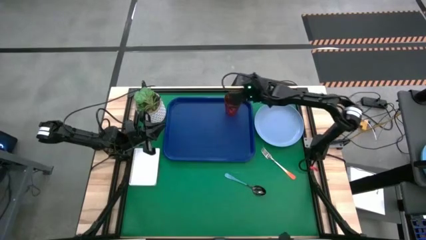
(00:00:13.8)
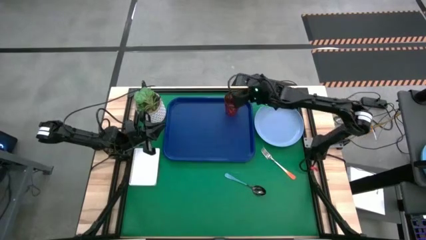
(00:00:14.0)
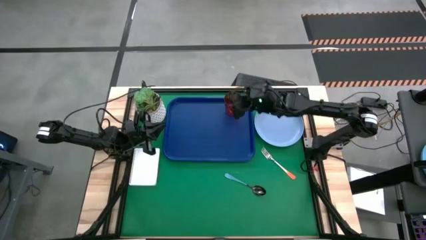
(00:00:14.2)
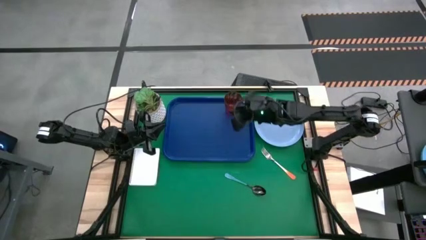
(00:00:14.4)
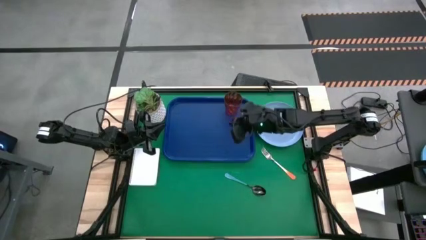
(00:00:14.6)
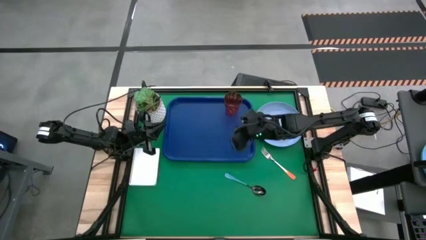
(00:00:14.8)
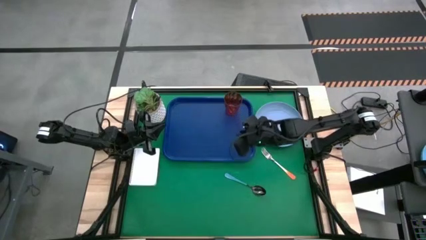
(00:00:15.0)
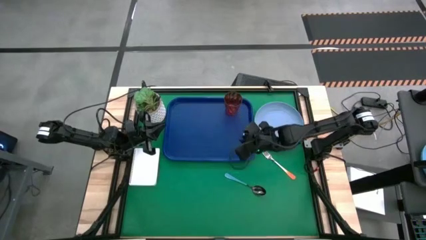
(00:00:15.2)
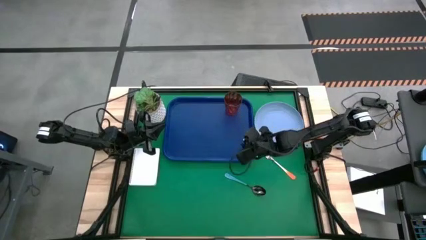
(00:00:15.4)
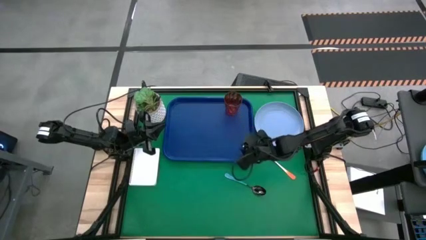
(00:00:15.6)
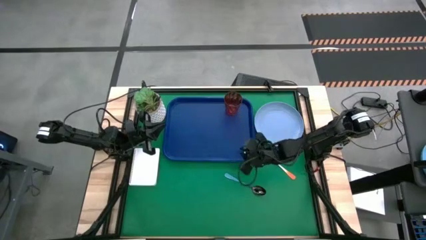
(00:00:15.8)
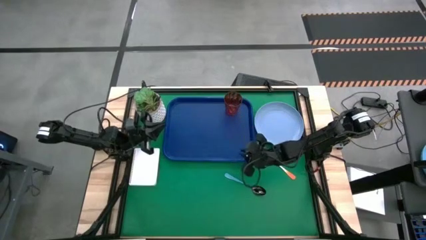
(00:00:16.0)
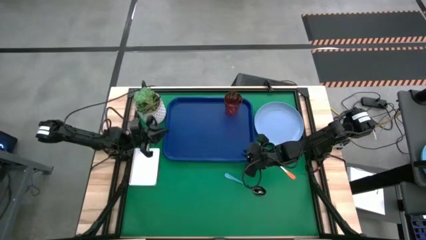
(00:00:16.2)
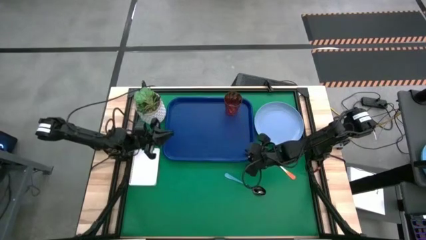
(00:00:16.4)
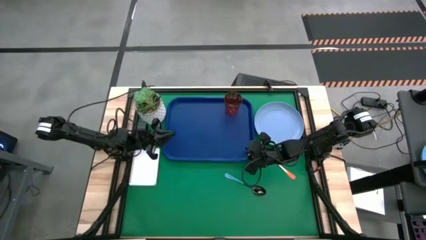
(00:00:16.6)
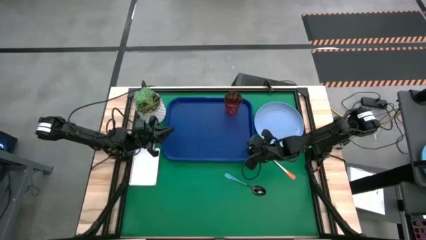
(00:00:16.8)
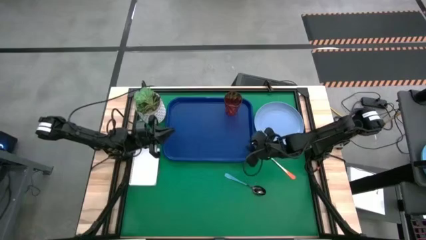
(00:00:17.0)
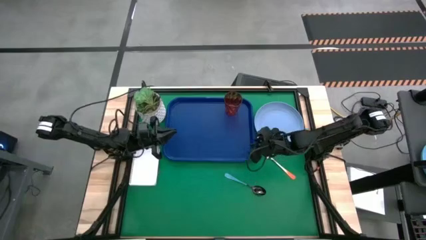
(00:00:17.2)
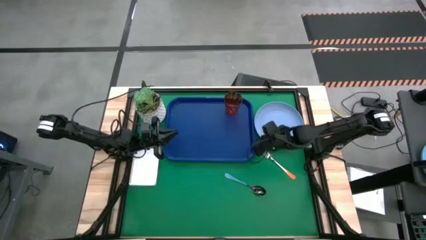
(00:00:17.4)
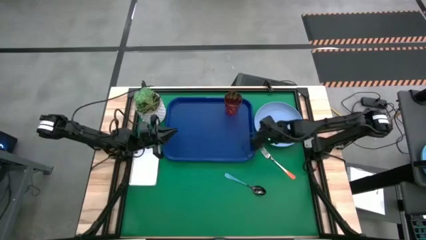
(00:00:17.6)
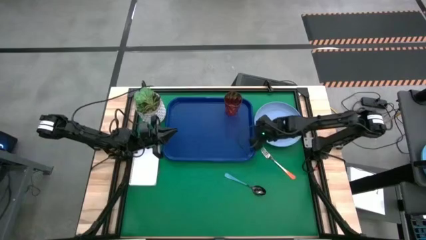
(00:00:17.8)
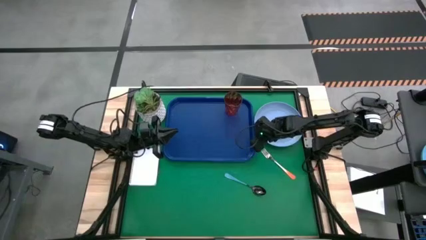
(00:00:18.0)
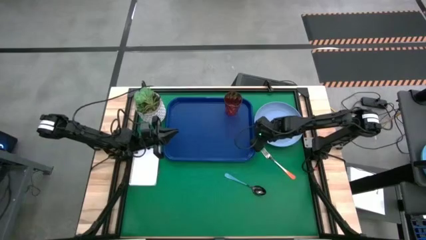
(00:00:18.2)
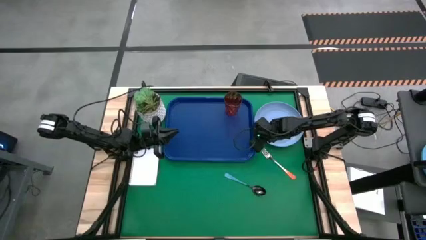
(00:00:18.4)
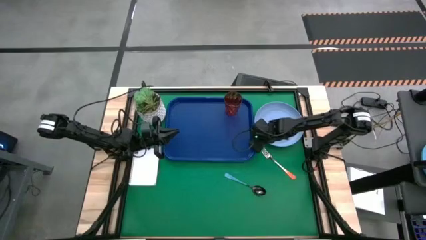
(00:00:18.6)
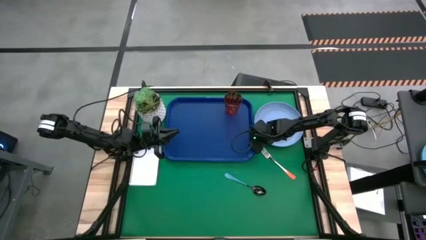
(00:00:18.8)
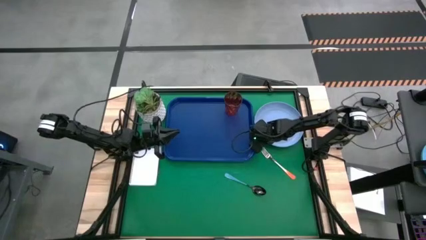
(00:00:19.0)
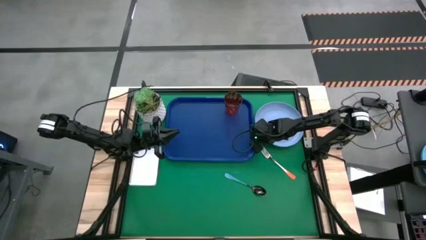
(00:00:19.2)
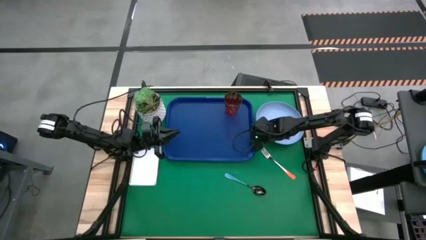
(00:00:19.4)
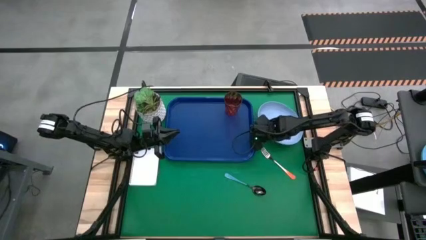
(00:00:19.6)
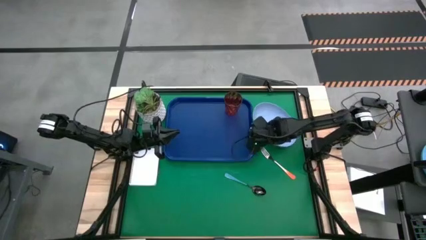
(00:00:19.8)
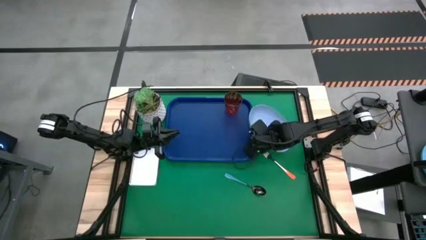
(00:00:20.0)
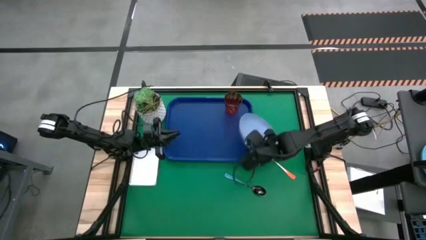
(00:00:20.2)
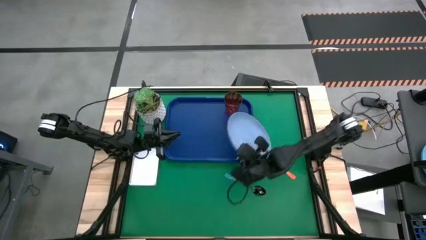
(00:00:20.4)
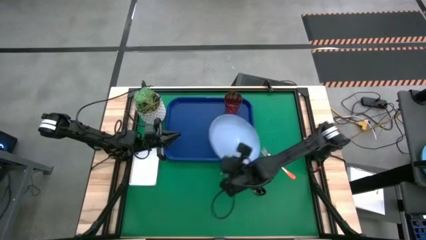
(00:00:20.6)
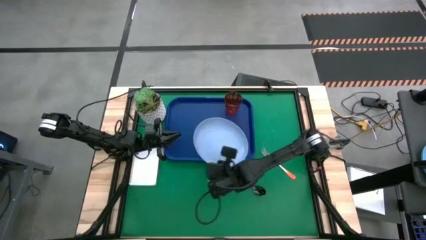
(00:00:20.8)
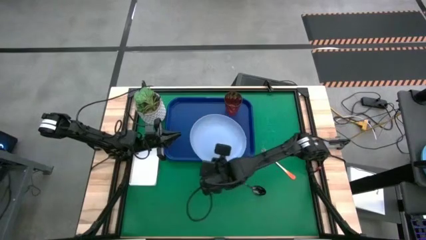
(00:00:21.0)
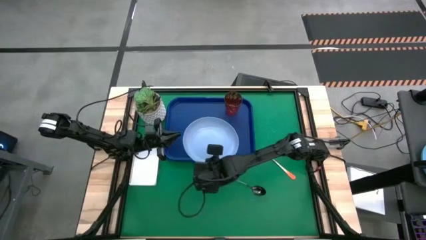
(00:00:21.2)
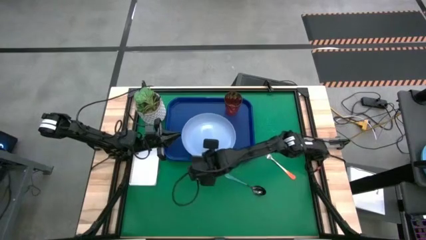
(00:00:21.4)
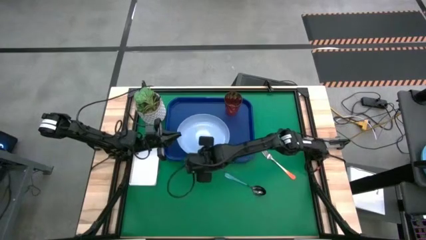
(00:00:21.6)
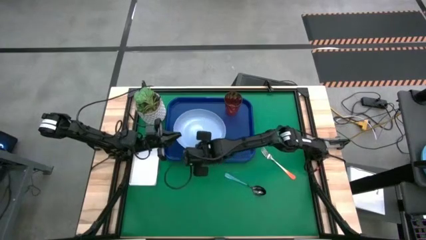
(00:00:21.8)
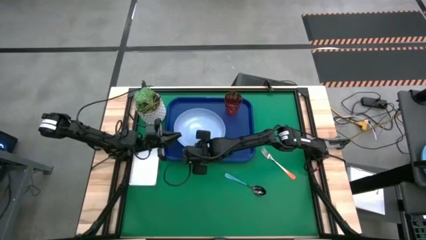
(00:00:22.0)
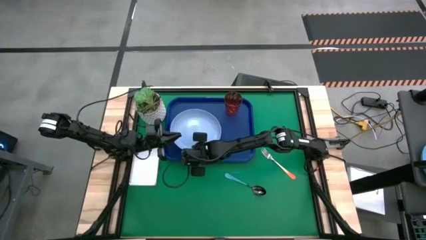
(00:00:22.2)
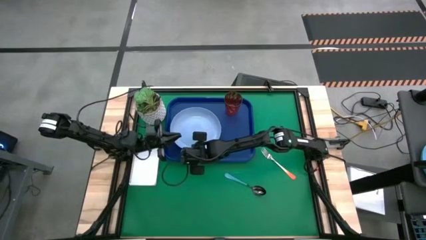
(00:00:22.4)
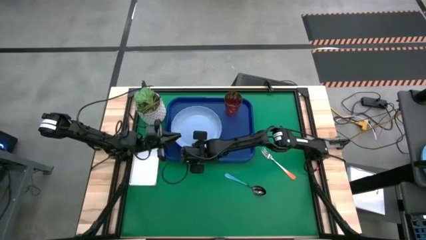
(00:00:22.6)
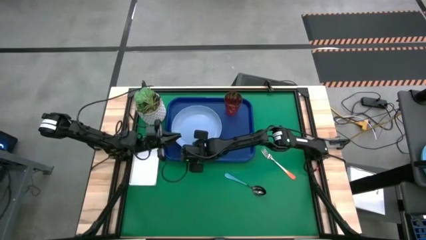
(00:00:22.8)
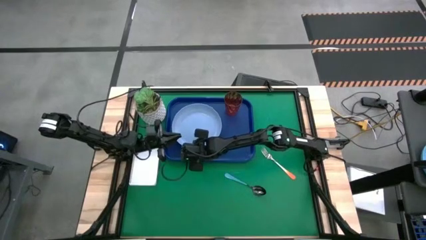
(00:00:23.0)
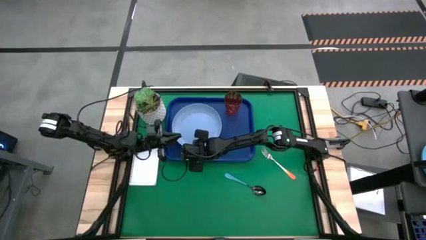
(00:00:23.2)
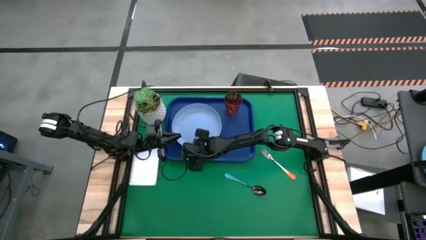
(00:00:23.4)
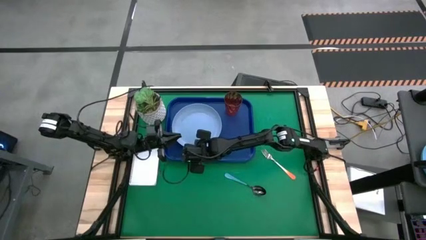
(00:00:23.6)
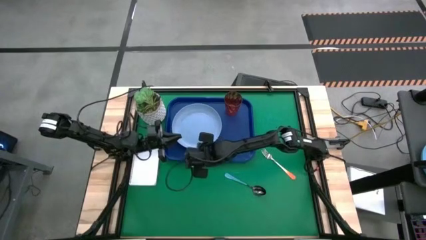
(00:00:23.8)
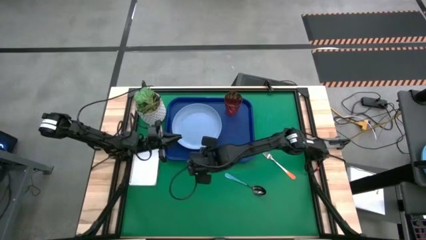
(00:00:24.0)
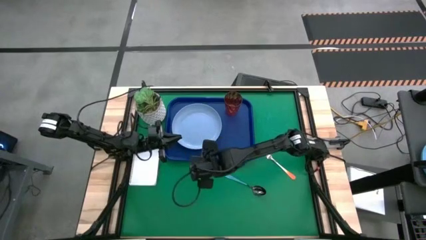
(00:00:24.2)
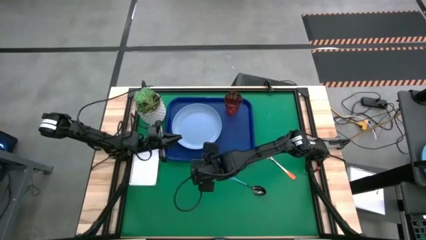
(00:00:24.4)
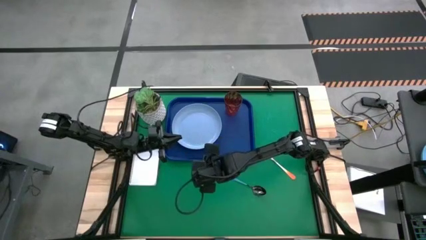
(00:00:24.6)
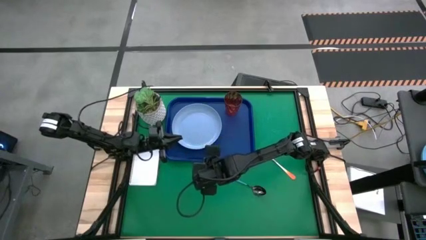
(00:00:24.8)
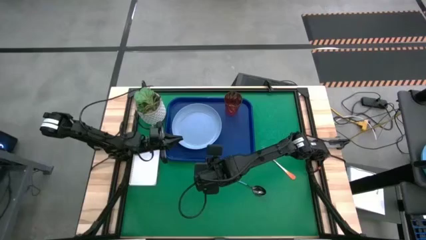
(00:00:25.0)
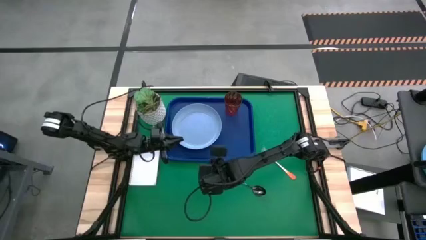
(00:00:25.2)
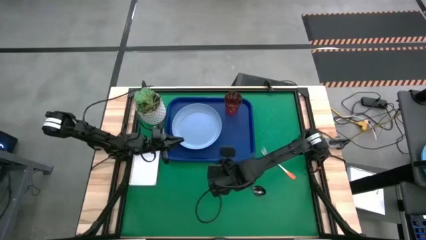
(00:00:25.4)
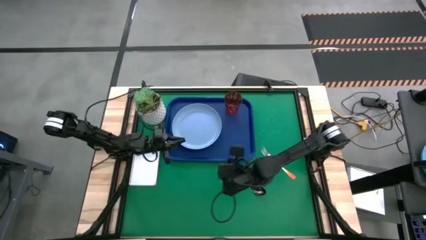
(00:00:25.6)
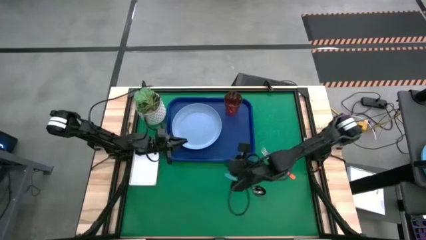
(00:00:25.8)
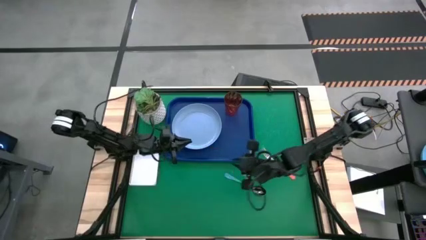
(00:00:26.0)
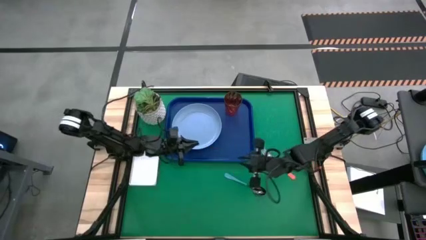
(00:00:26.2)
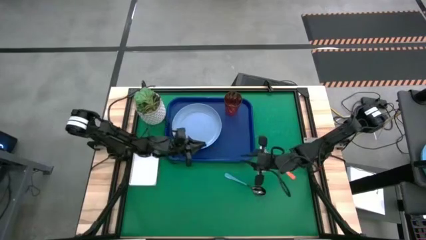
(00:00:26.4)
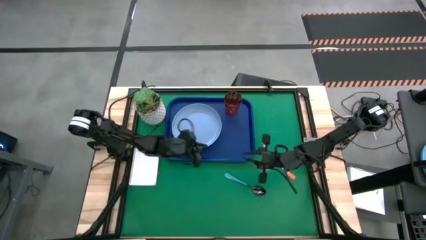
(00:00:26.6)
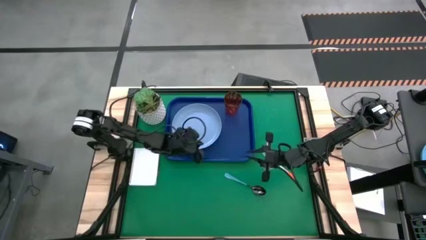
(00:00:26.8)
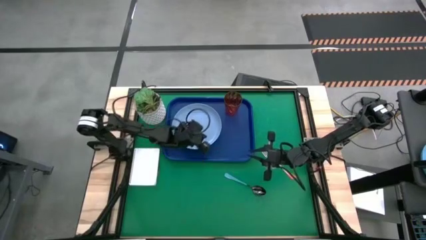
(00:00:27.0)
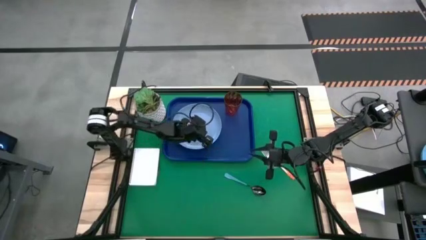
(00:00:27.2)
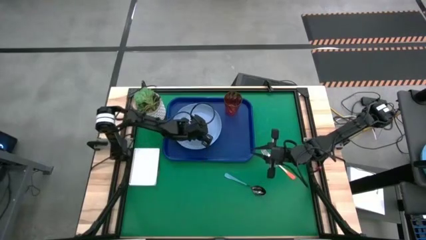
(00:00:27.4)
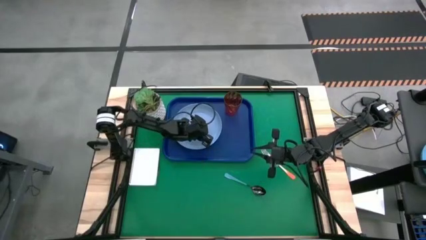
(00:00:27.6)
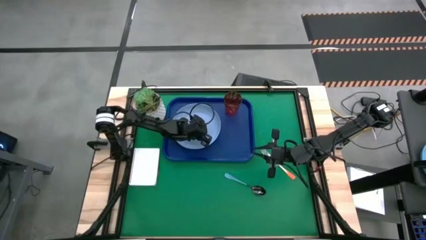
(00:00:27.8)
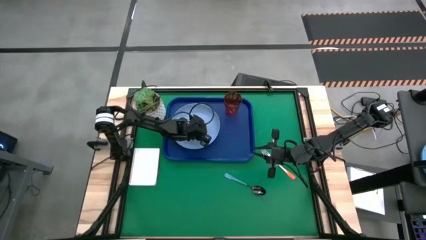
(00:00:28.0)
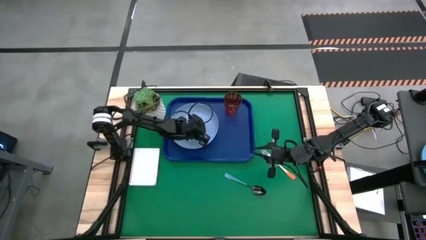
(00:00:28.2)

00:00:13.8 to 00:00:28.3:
Task: Pick and place plate/cup/fork/spoon on tray
Put the light blue plate on the blue serving tray to the left of the brown cup
